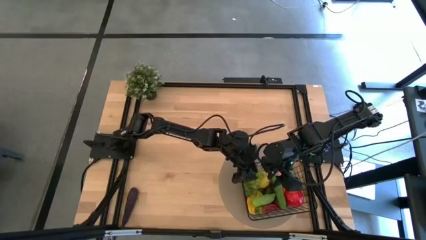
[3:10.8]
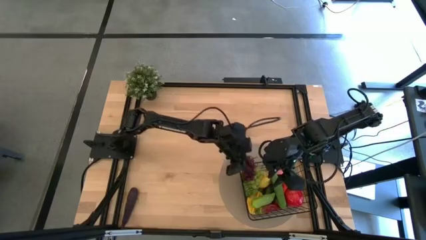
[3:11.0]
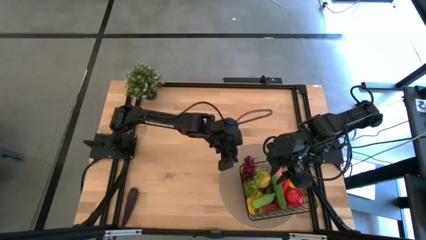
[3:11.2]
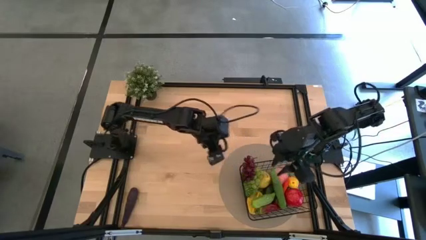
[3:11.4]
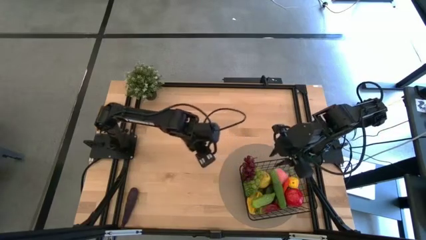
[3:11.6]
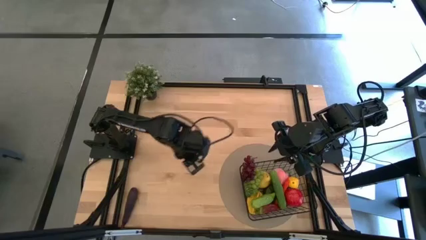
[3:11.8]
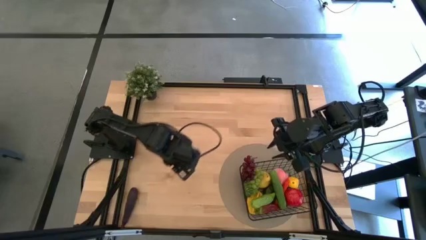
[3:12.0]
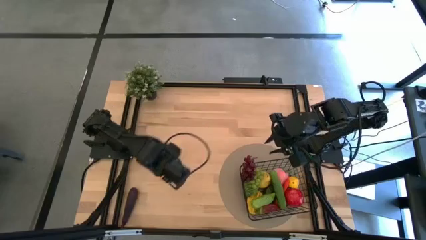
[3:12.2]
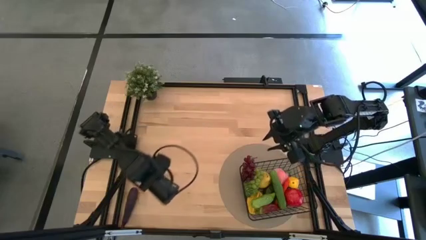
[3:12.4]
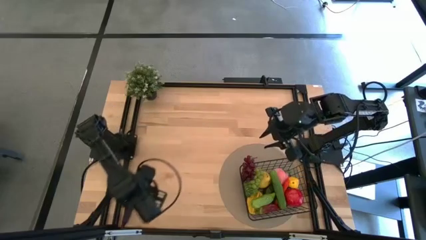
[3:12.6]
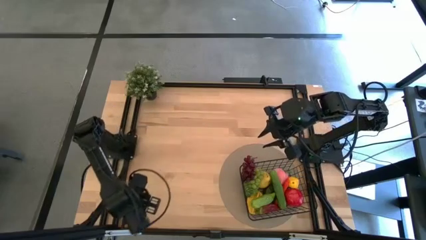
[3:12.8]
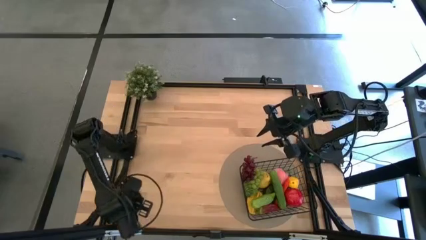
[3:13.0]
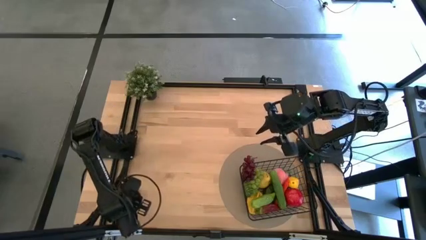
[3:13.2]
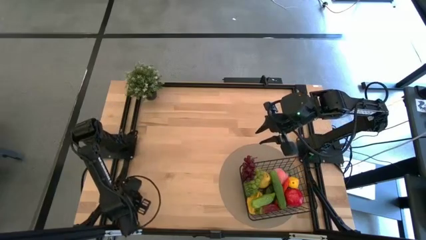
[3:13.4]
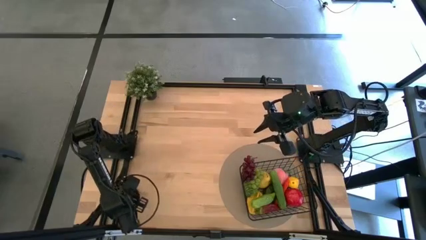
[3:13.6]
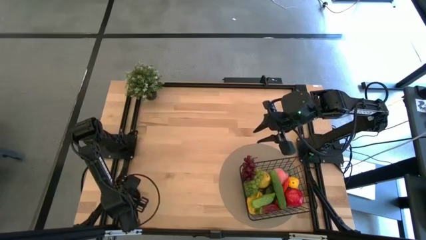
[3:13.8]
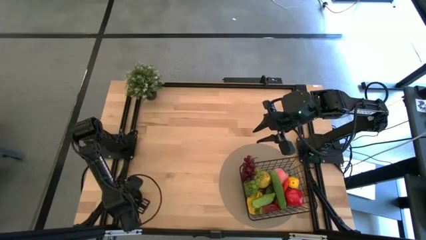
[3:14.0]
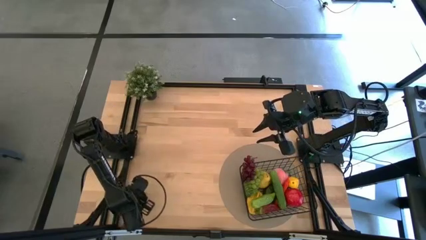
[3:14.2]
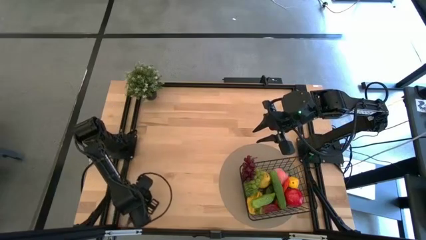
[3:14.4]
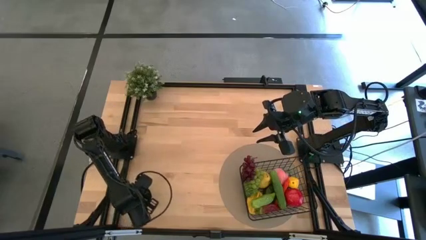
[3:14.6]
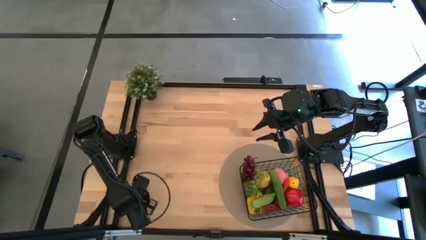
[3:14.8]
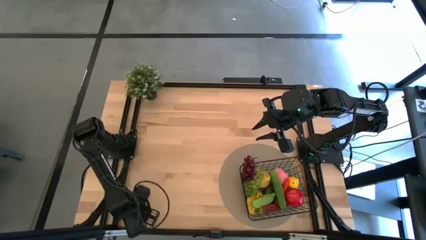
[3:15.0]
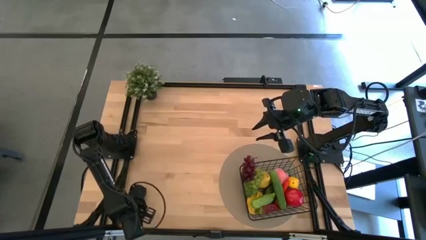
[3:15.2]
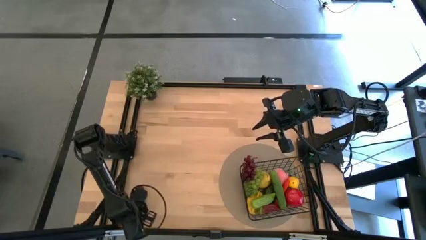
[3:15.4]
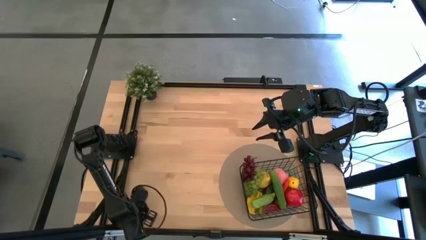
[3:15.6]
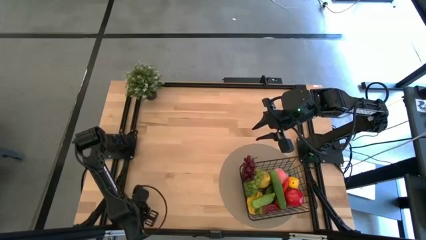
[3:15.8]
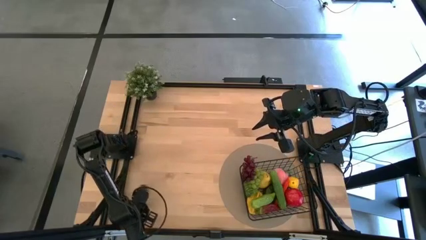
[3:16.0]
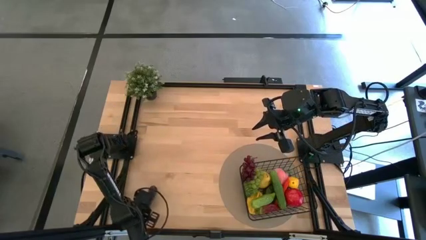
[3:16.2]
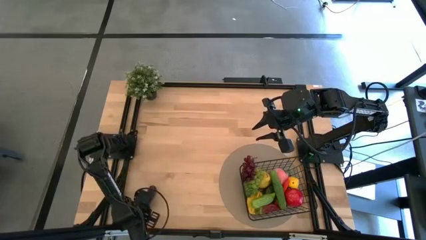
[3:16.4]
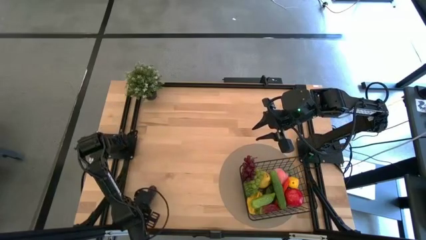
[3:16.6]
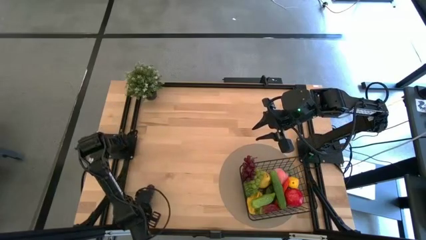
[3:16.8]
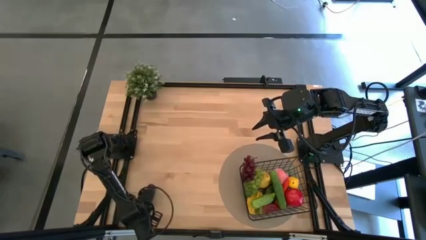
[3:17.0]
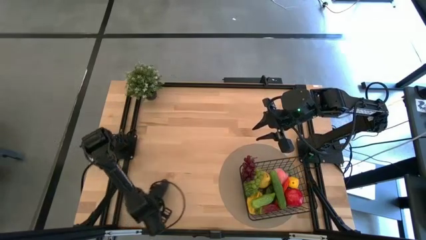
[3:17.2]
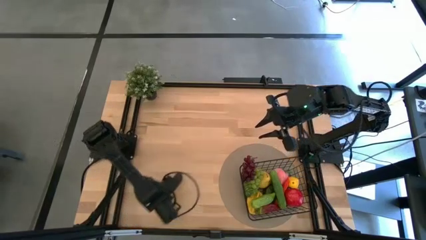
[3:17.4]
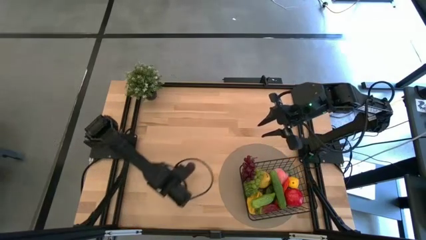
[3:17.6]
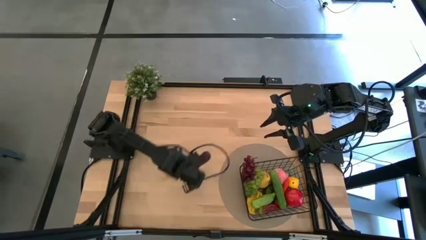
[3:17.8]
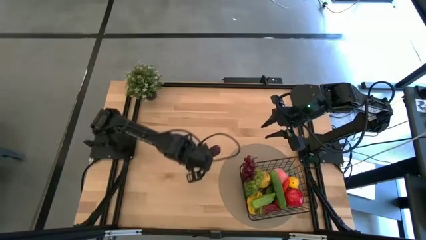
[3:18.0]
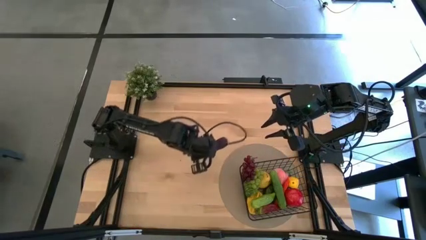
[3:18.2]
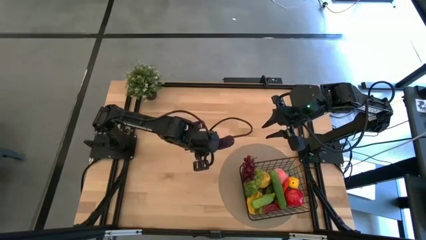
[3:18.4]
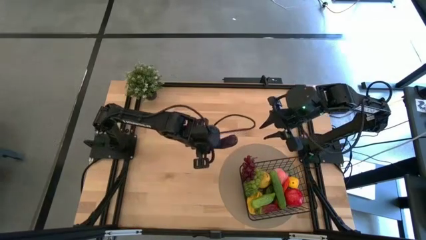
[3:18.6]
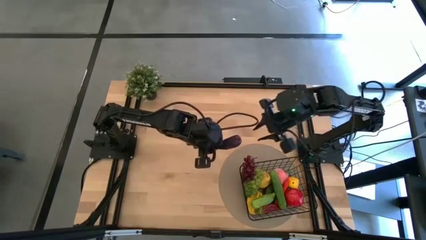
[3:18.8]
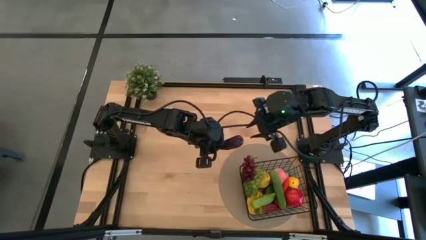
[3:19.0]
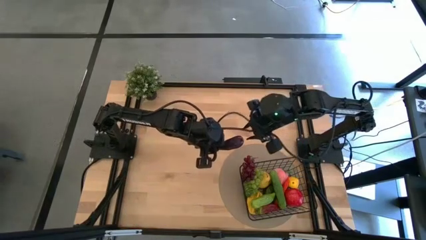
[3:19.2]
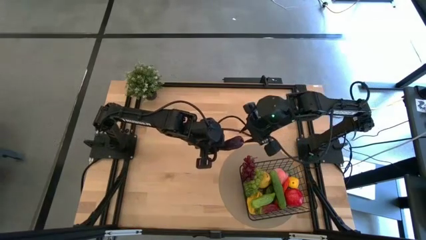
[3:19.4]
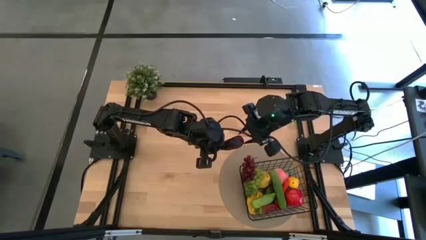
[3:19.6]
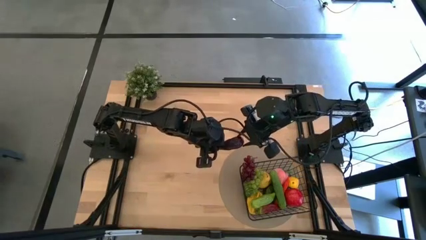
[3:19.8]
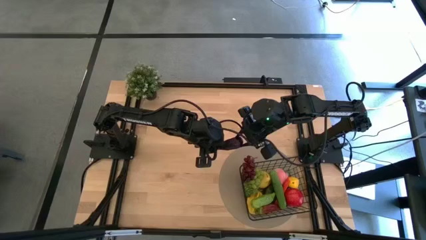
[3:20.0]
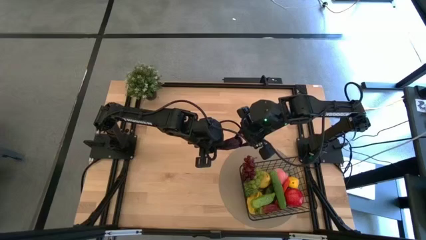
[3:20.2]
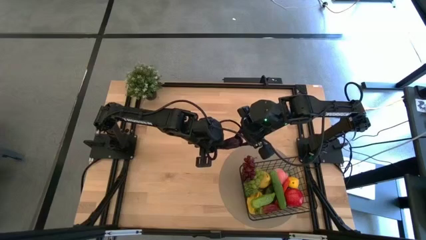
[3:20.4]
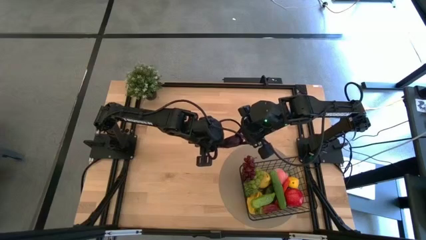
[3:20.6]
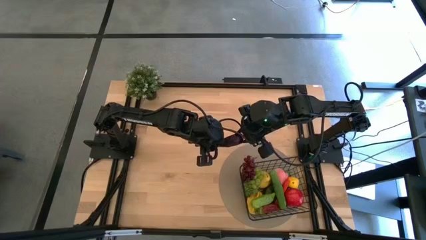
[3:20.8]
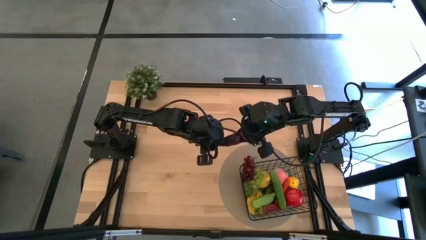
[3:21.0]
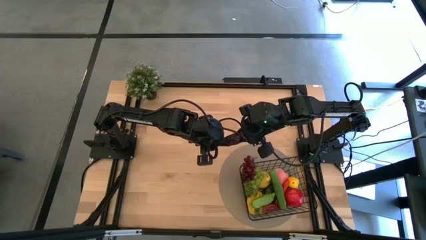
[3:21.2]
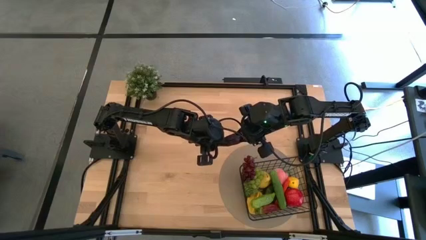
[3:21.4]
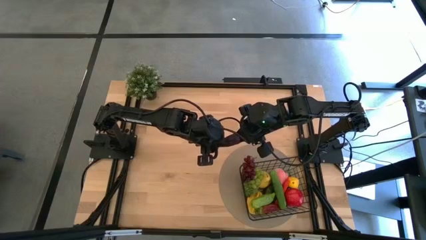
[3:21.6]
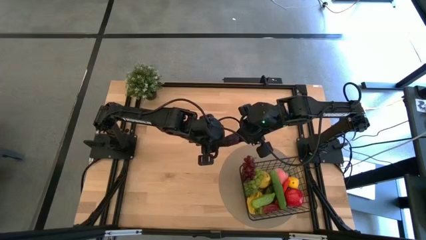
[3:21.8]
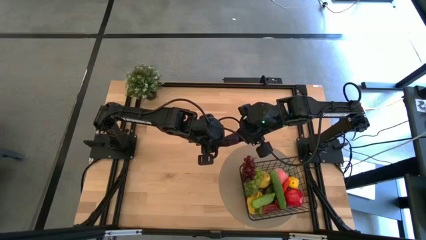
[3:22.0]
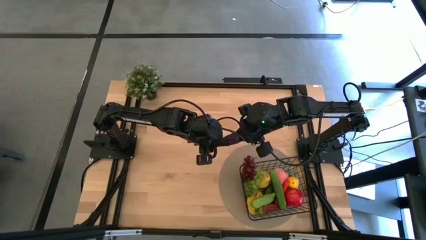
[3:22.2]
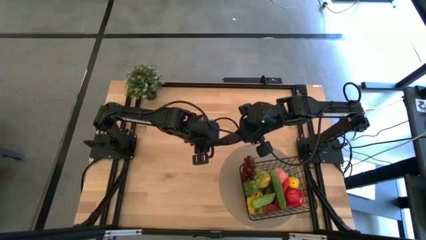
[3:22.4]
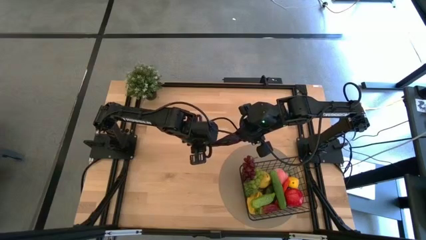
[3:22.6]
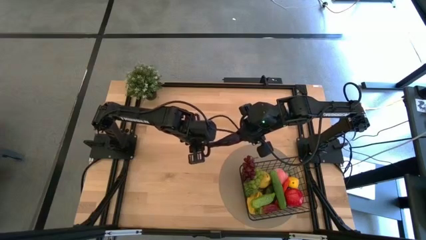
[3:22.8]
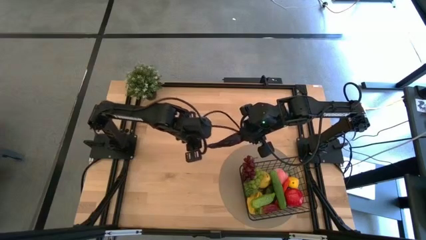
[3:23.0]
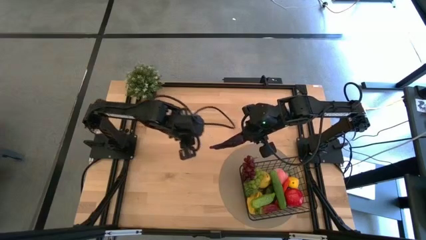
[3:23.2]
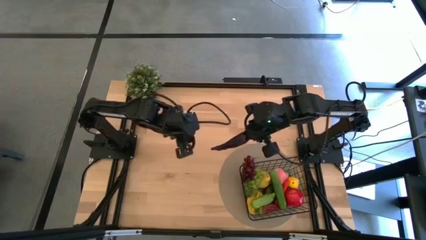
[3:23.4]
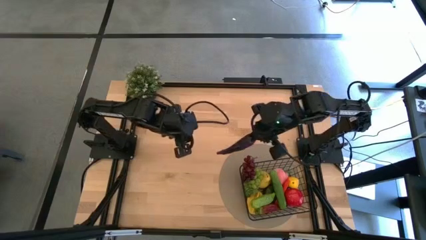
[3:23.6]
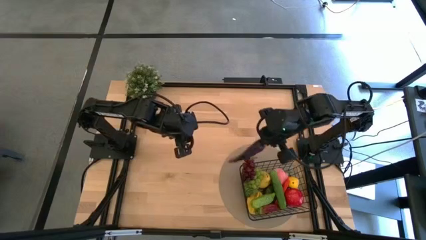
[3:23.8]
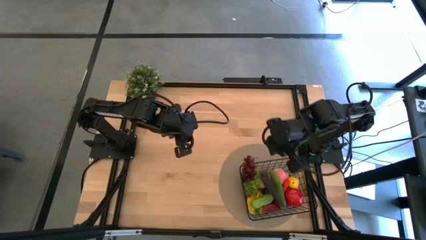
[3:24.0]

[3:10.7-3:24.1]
Task: Build produce basket
Put the eggplant into the wire basket

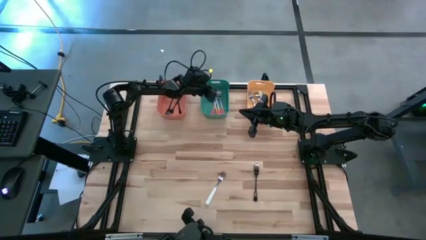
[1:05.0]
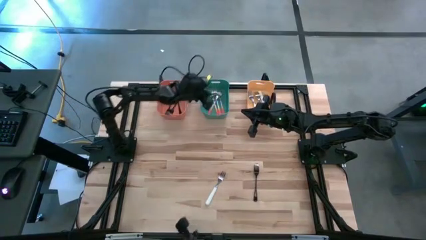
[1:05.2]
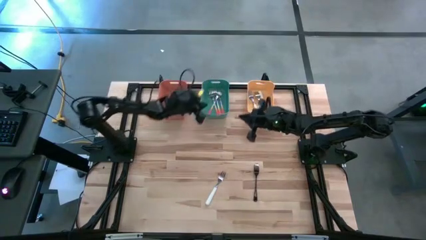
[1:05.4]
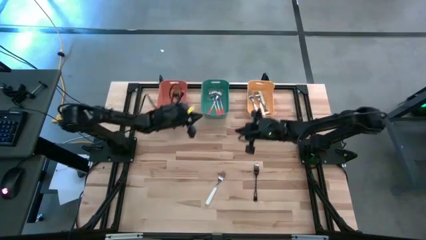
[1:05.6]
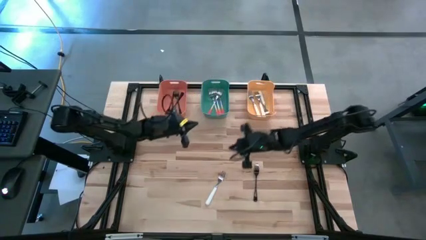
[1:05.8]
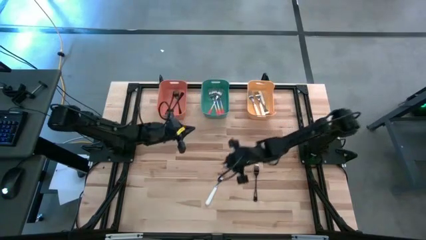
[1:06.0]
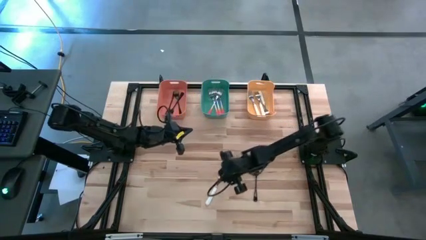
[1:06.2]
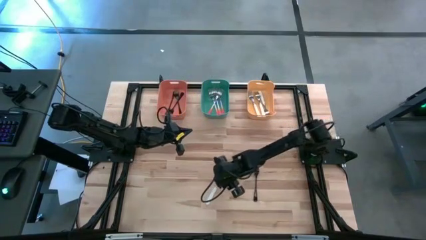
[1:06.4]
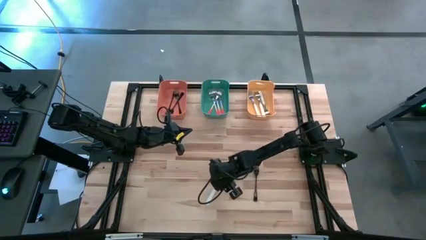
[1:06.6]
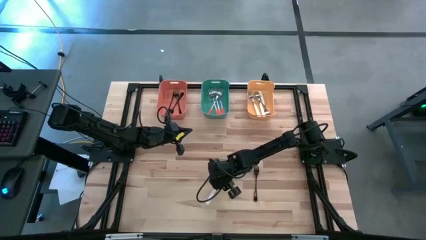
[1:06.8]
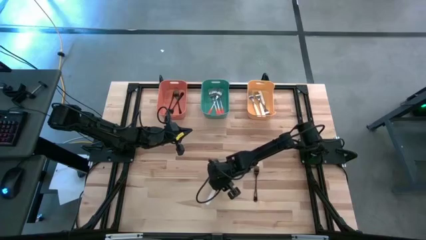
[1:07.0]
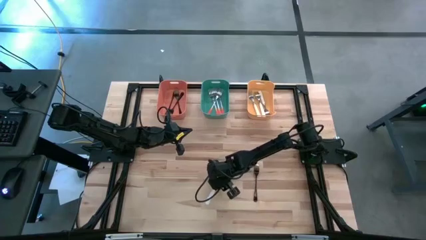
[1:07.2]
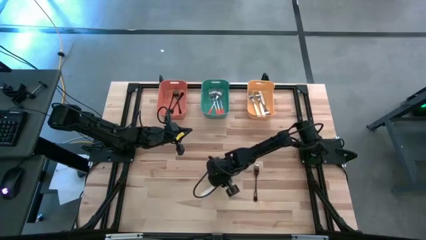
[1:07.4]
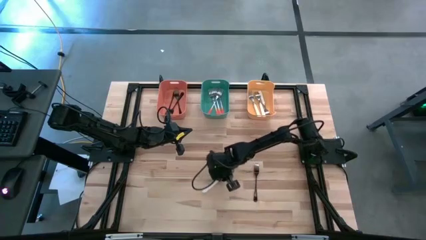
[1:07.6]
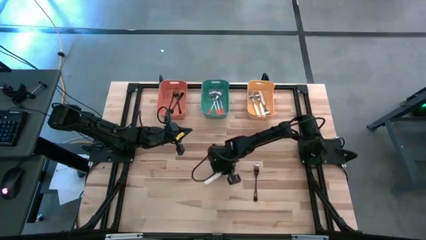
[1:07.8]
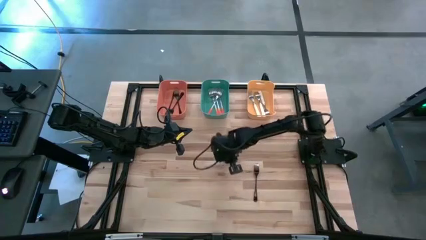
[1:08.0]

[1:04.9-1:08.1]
Task: Sort silverware by color (type)
Put the white fork into the yellow bin
